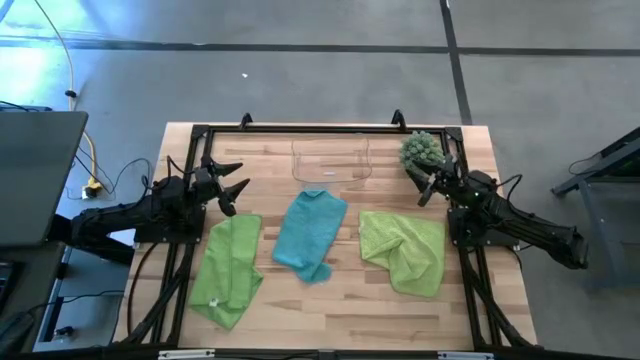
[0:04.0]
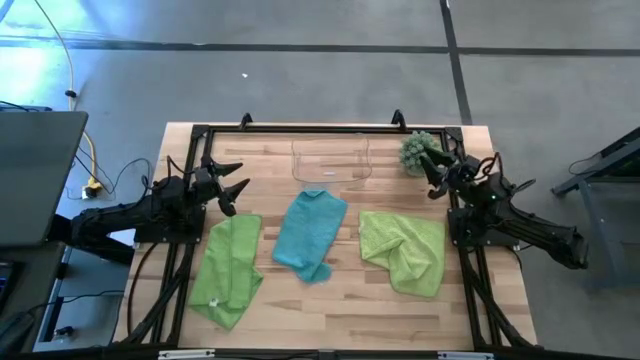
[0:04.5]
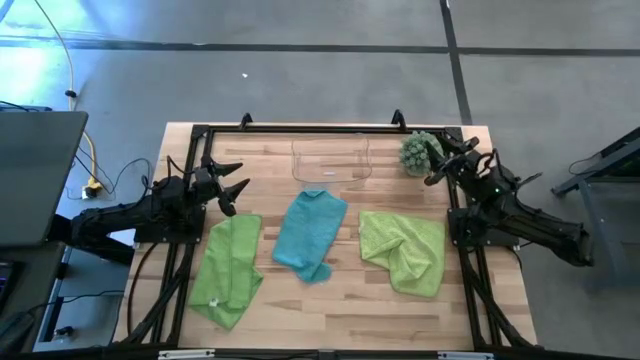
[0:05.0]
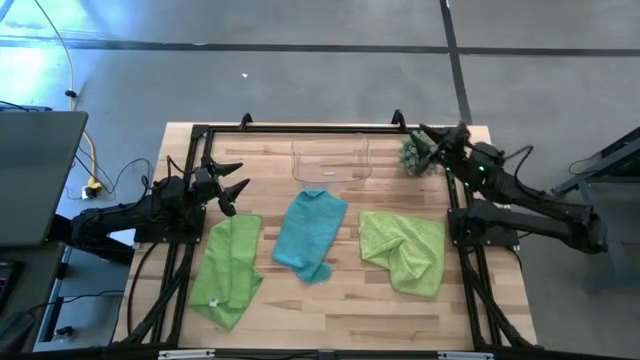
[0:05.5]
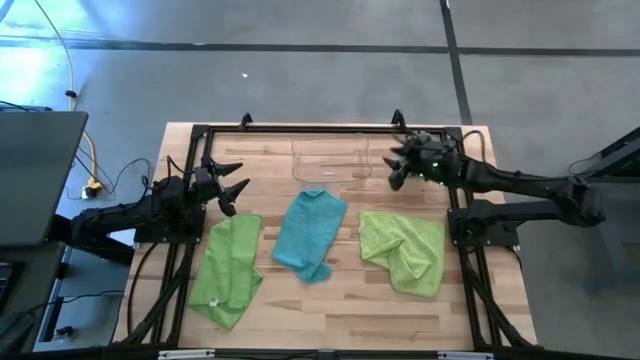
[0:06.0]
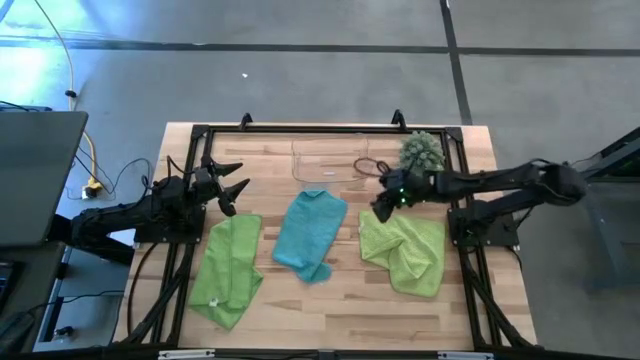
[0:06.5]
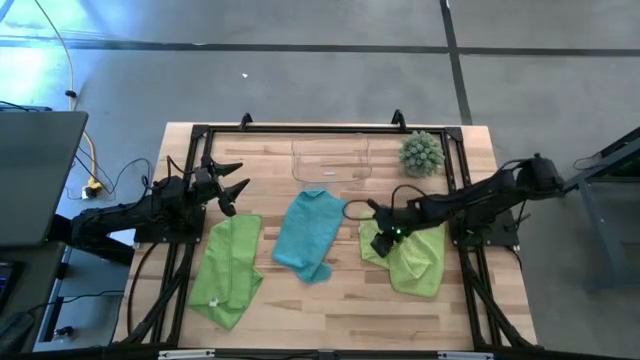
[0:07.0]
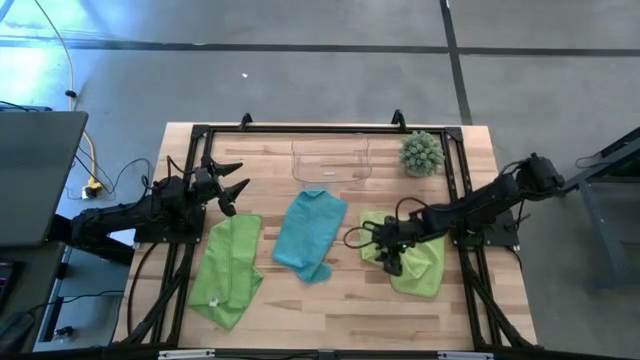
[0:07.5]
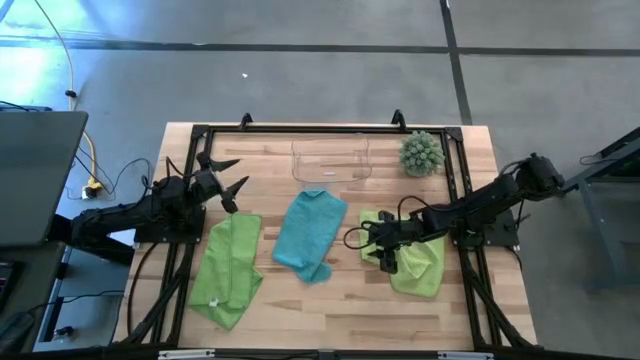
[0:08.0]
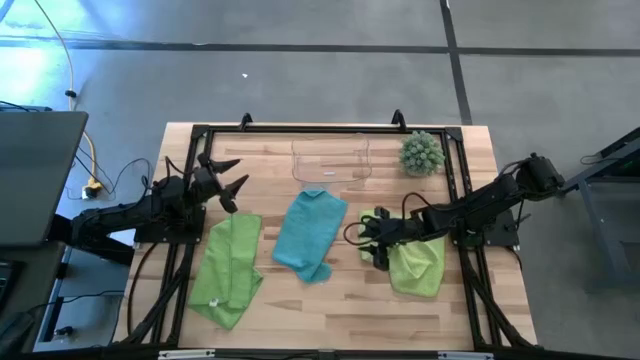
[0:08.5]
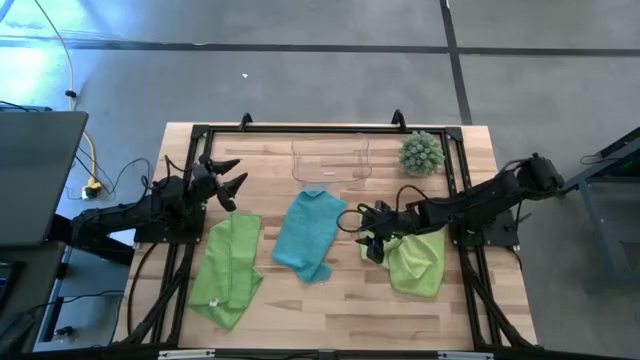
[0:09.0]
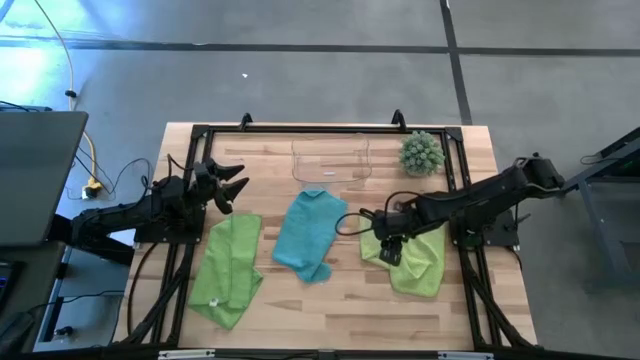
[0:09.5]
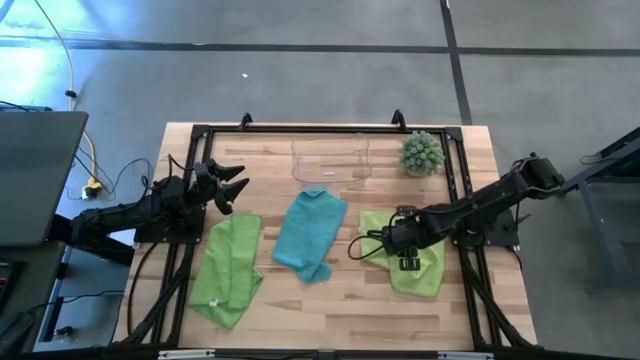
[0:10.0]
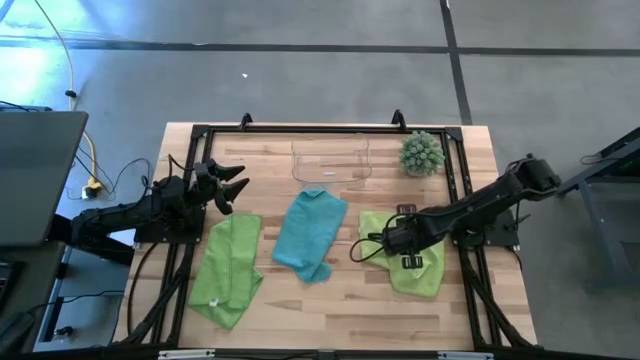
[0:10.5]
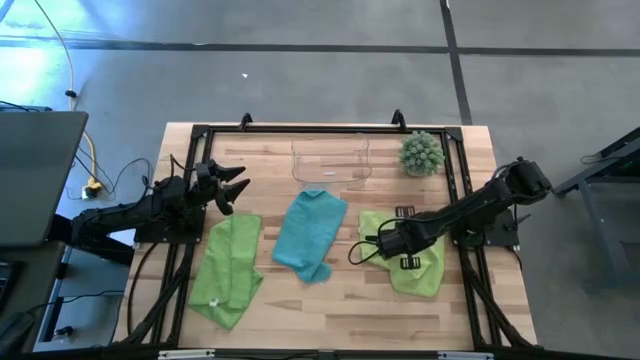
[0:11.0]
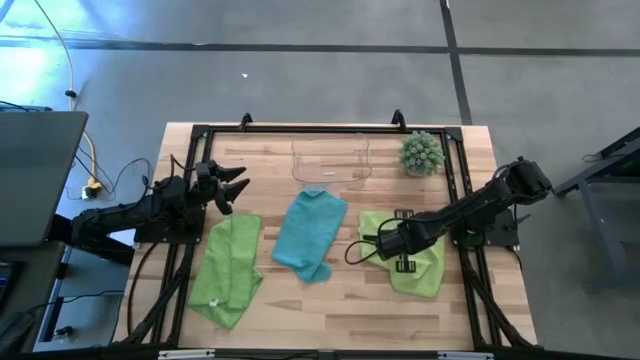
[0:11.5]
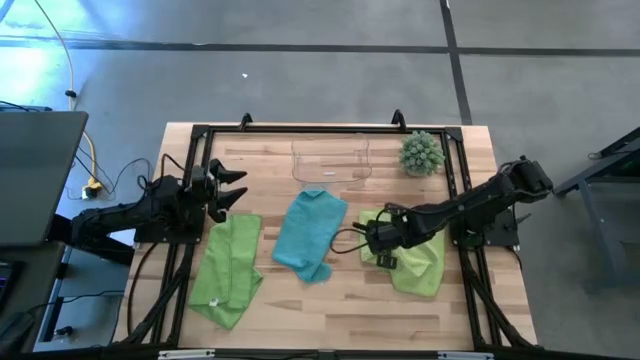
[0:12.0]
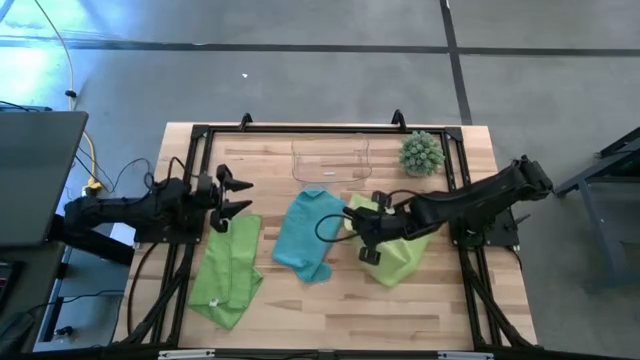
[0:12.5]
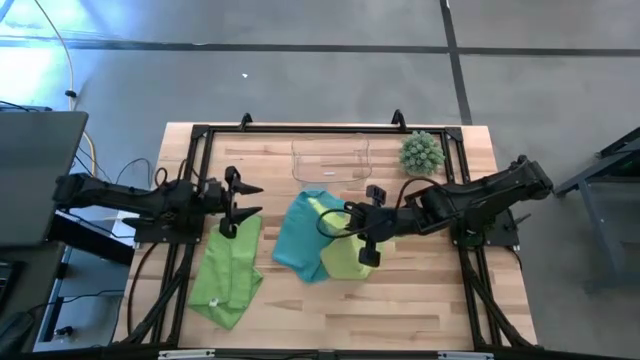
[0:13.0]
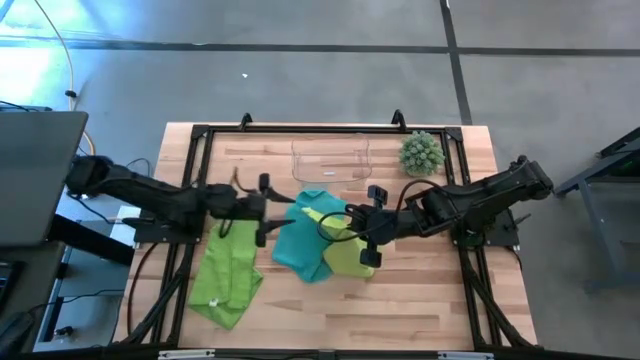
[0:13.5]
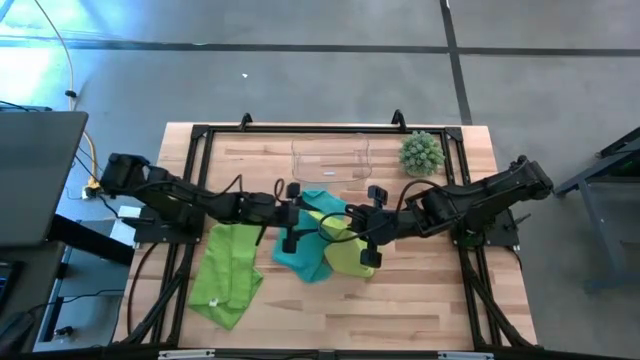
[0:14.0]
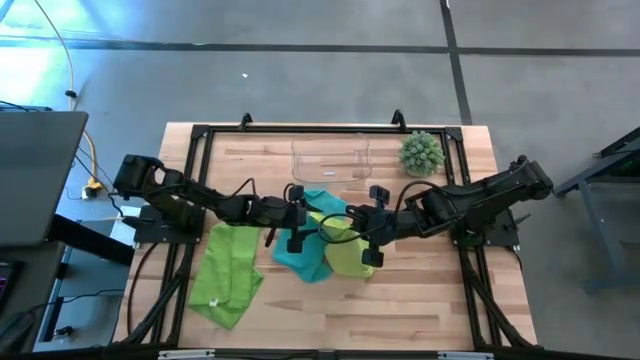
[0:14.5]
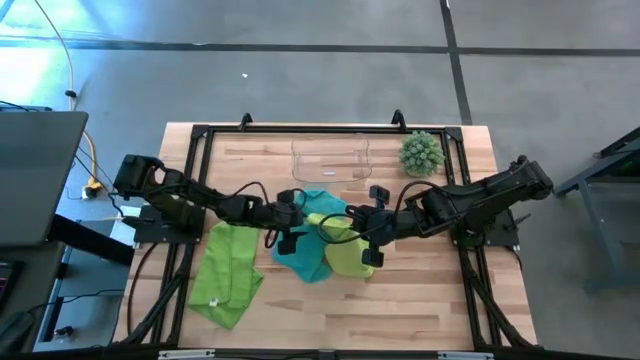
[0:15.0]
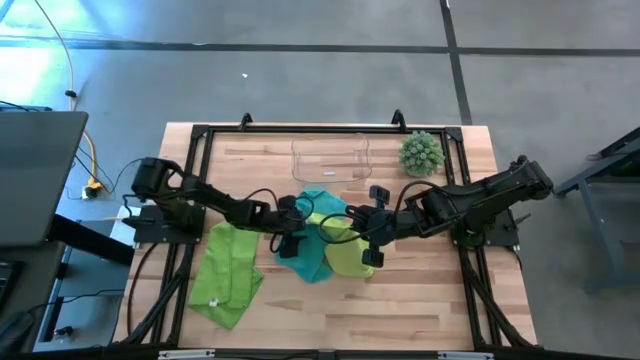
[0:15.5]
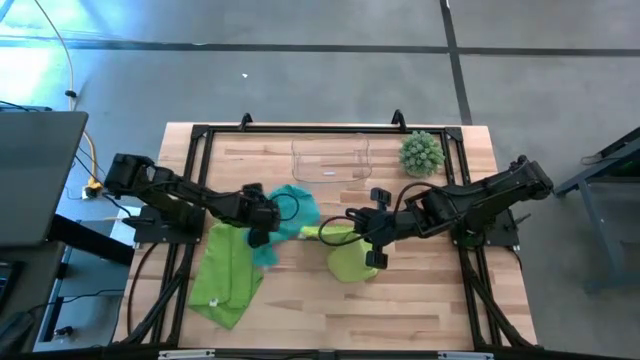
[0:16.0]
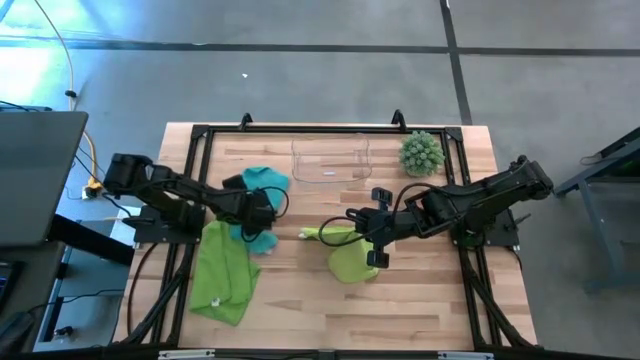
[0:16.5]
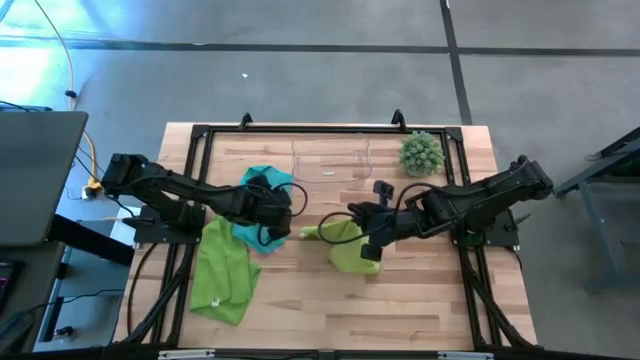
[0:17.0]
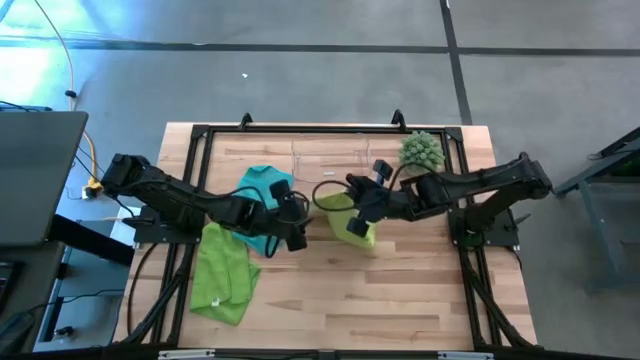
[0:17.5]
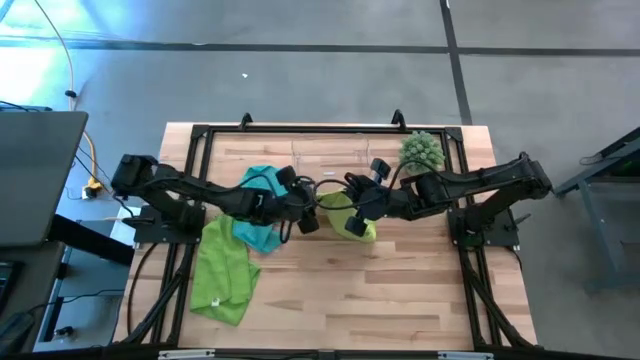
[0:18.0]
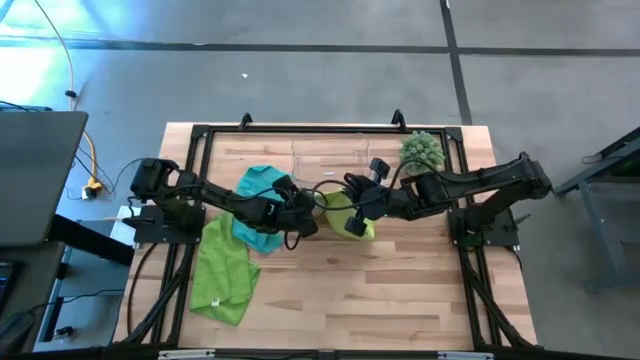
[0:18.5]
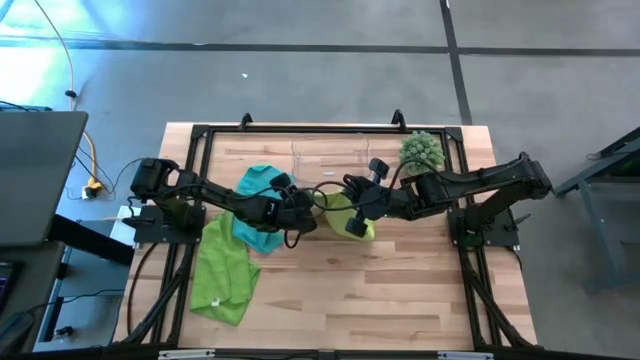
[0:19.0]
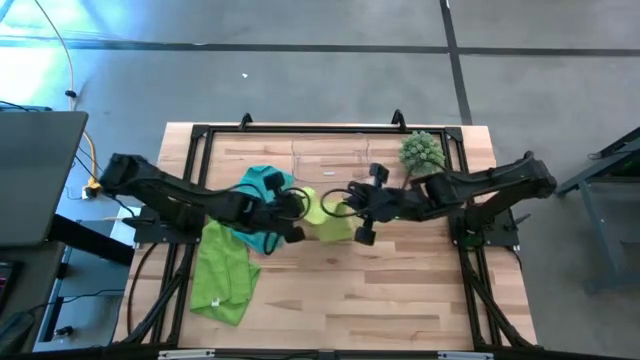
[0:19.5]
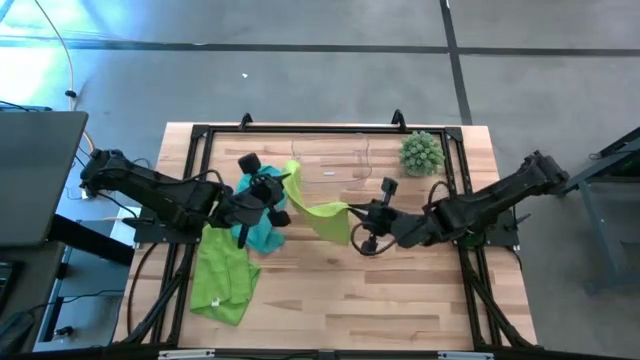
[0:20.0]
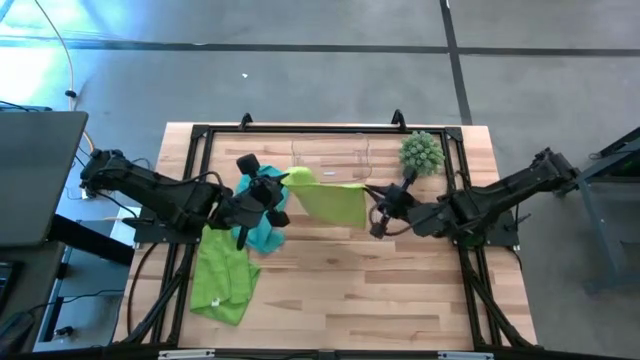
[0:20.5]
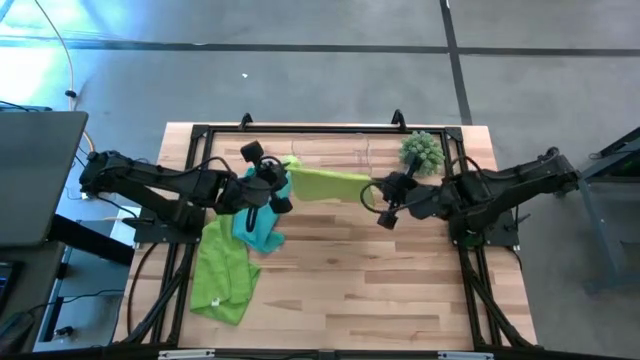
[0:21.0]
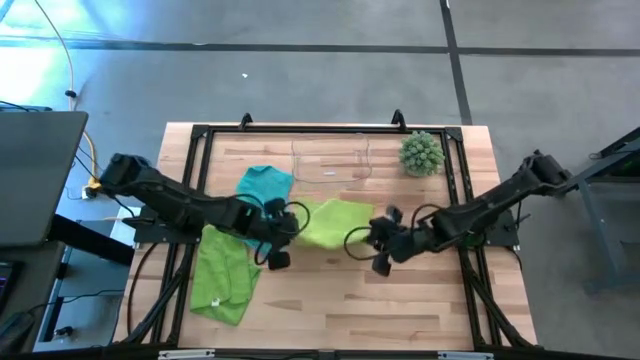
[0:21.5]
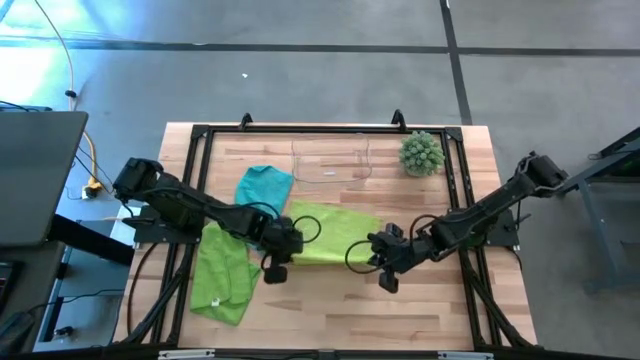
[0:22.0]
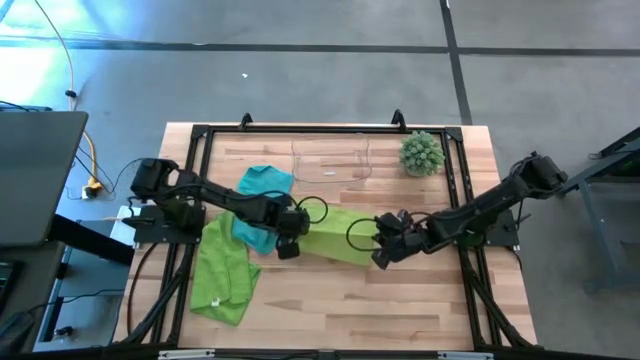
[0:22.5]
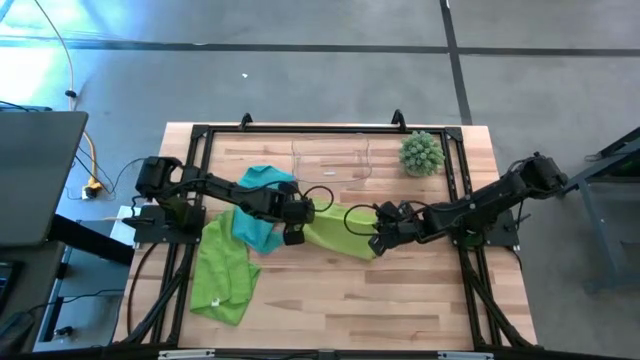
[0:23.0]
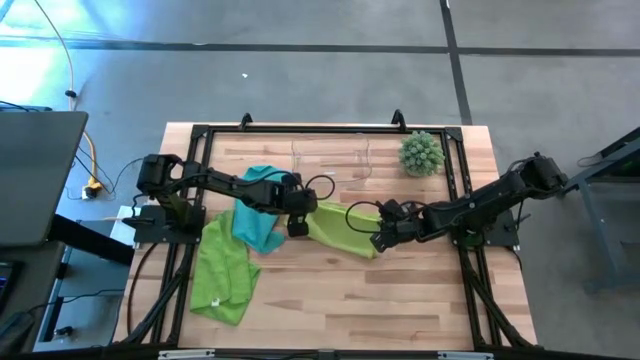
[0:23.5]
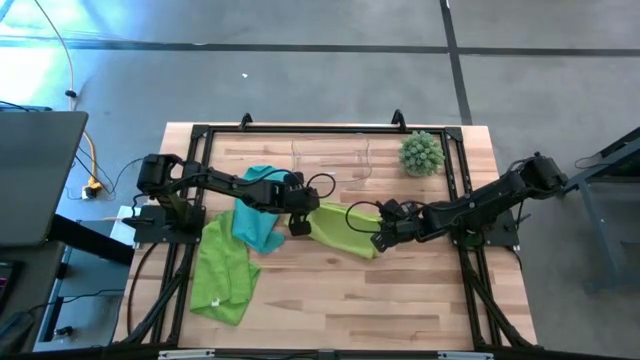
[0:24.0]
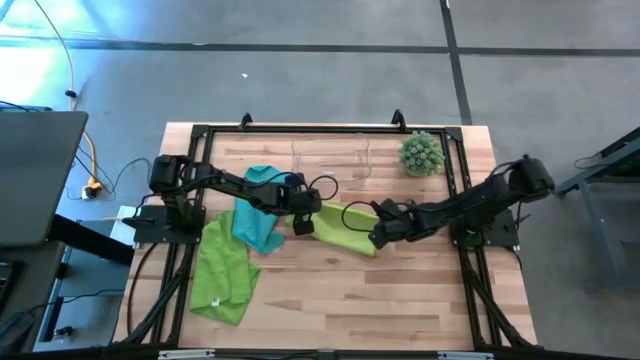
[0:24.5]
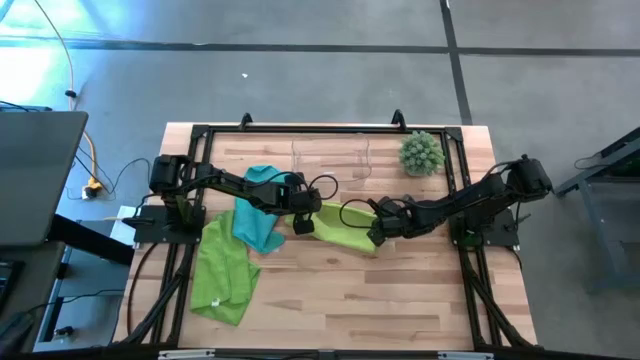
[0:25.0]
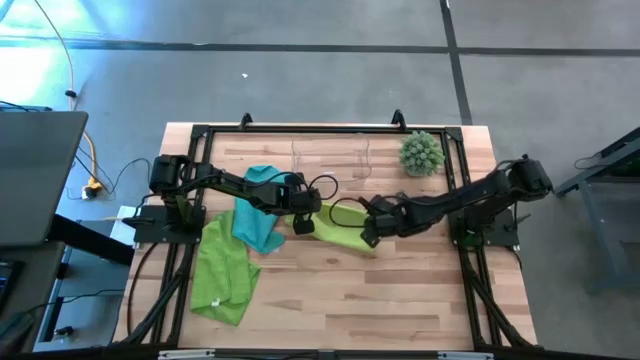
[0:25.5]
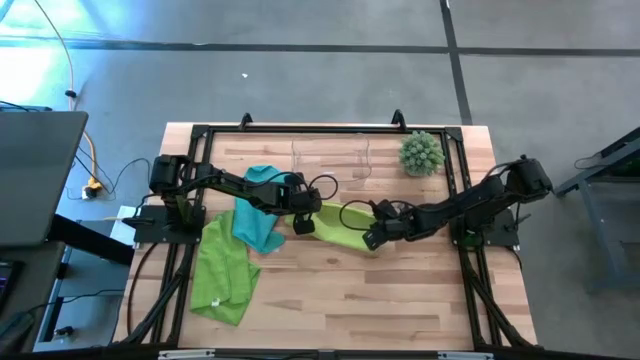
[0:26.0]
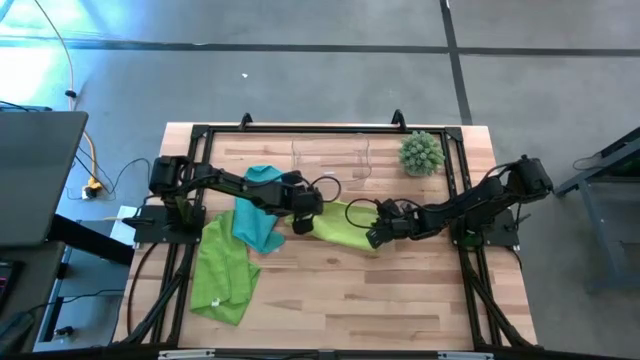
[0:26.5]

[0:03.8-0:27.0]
Task: Roll microfiber towels into tight, uniform cylinder then place into a basket
Fold the light green microfiber cloth
